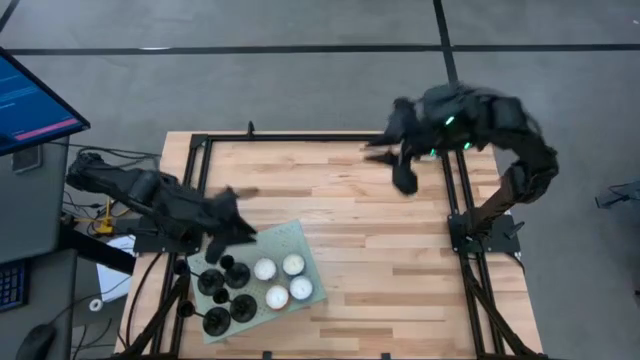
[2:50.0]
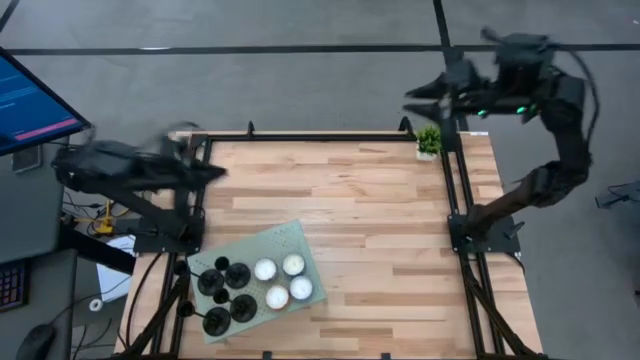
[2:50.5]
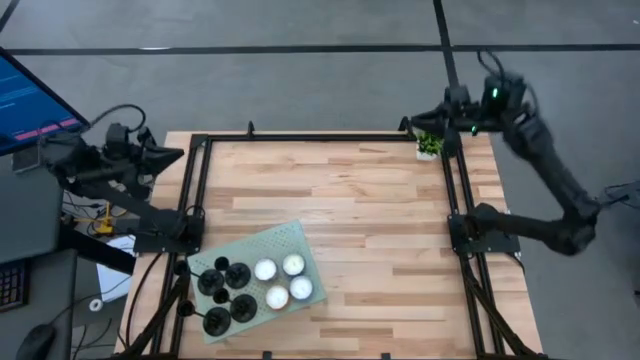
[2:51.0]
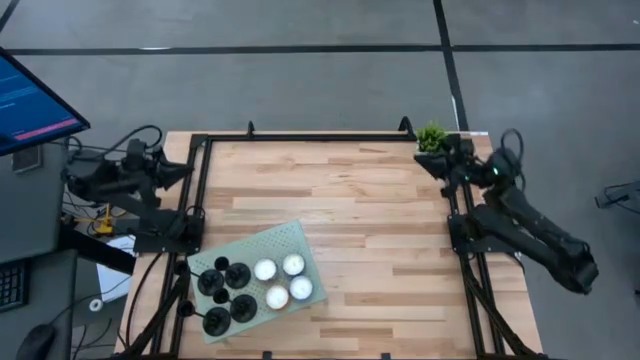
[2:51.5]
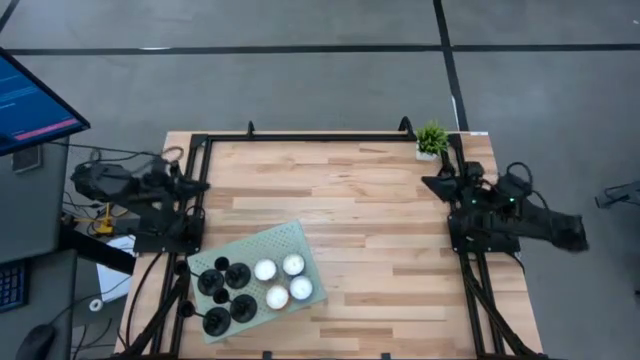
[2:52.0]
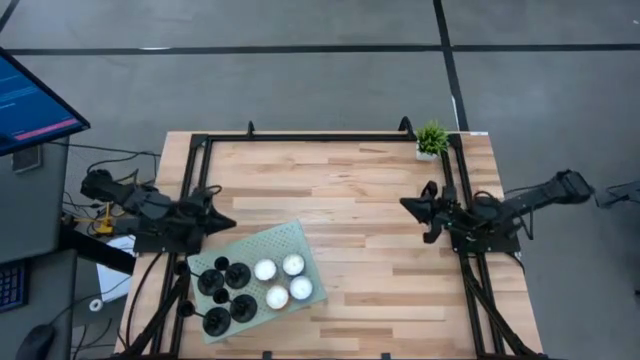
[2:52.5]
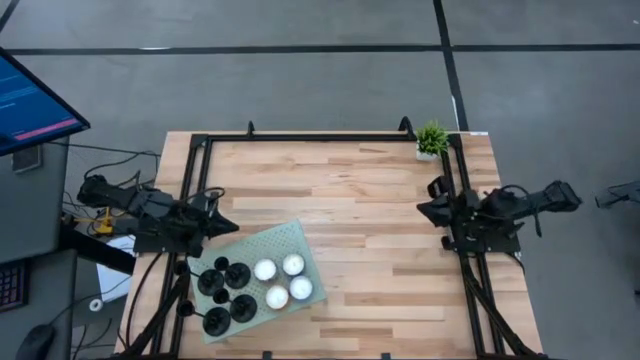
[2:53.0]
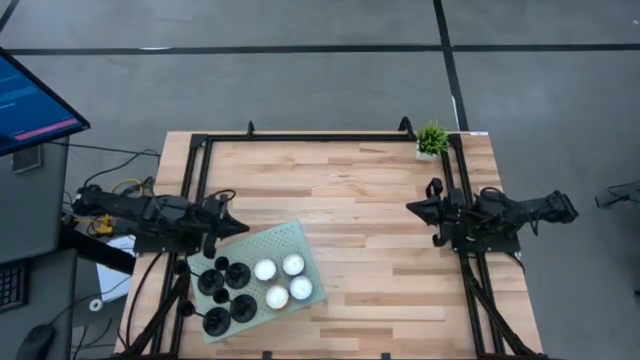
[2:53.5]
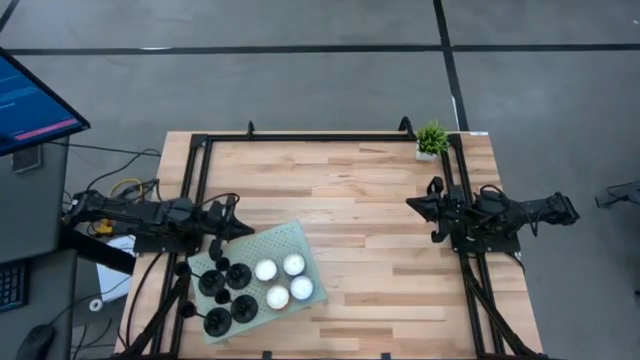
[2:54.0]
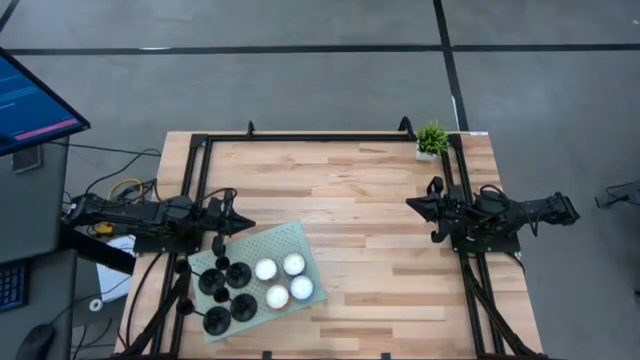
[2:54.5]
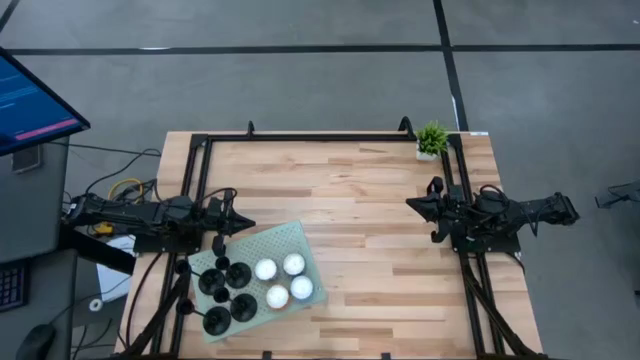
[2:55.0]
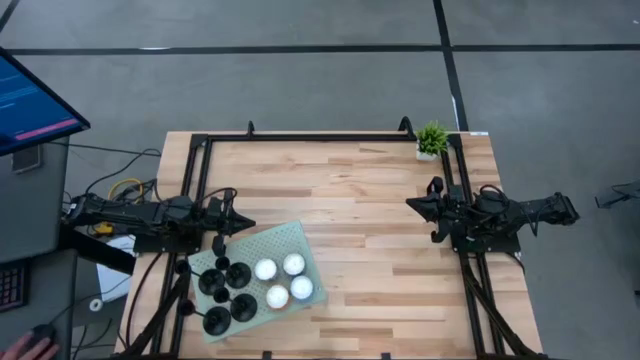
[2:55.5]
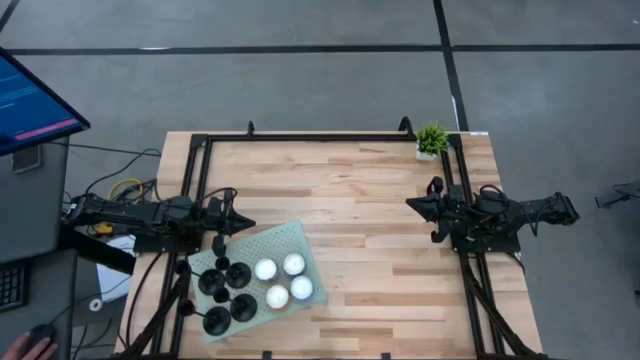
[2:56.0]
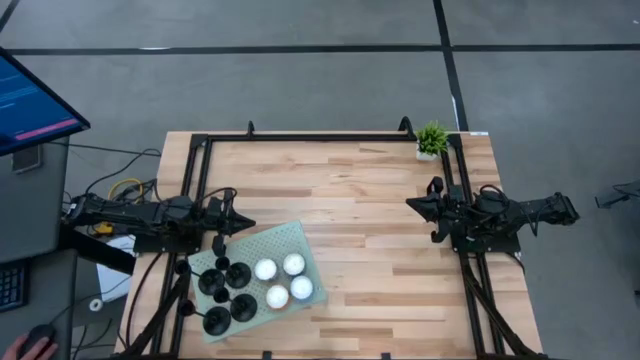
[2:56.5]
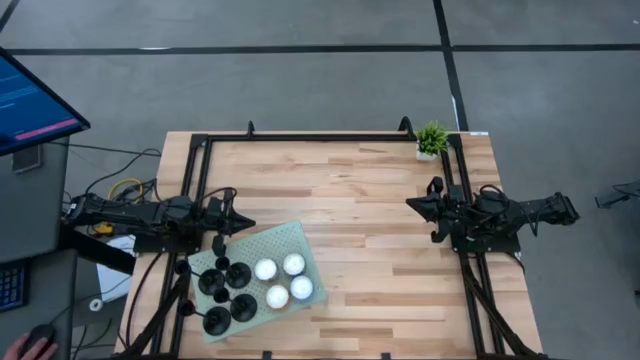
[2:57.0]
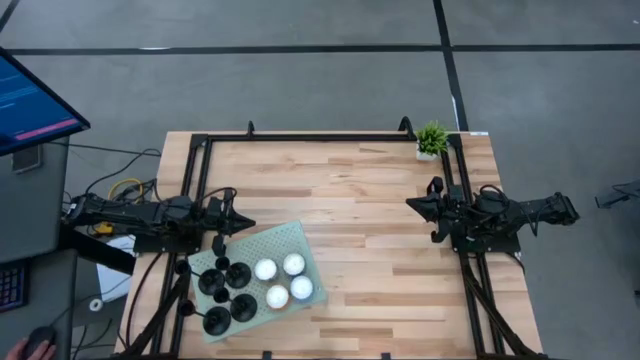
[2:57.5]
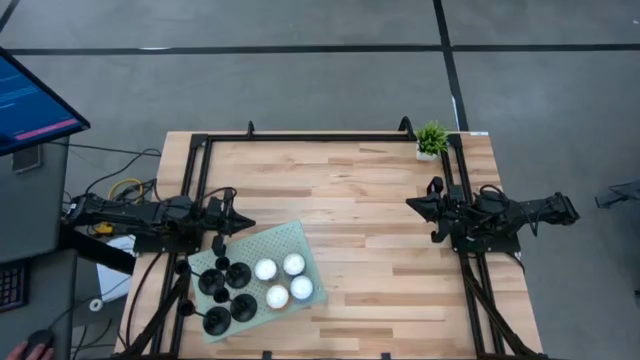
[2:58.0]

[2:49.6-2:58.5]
Task: Stock candles on shelf
Return to Home Position

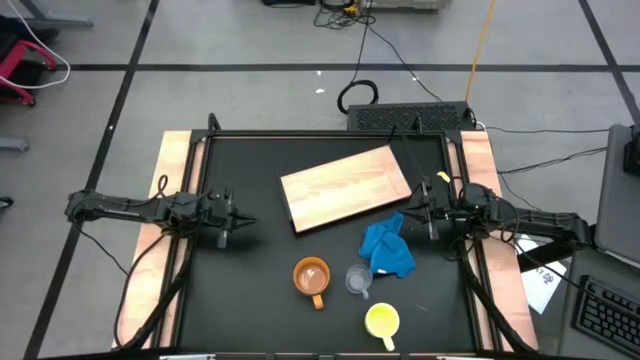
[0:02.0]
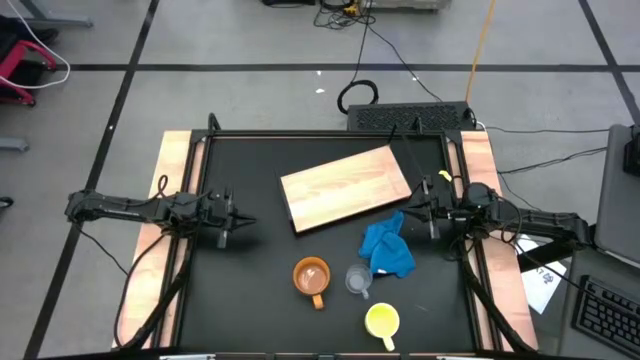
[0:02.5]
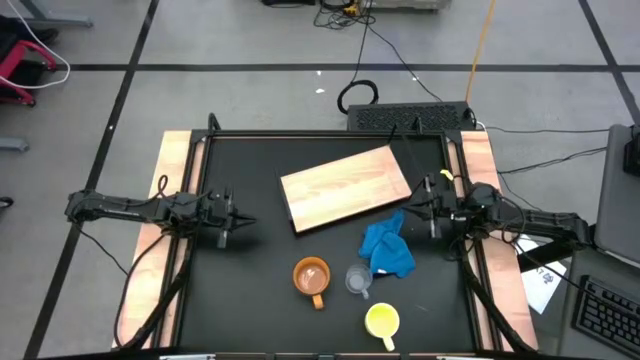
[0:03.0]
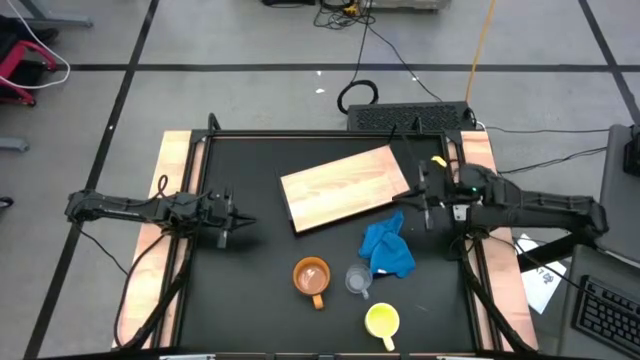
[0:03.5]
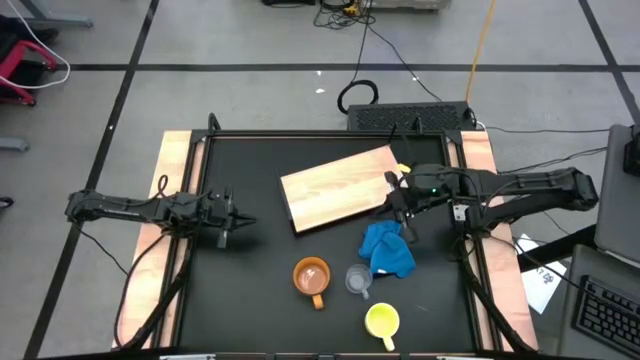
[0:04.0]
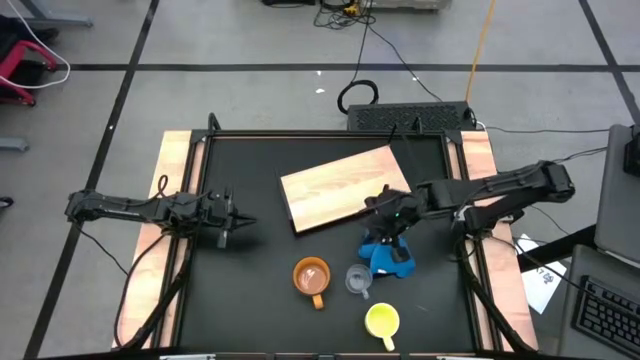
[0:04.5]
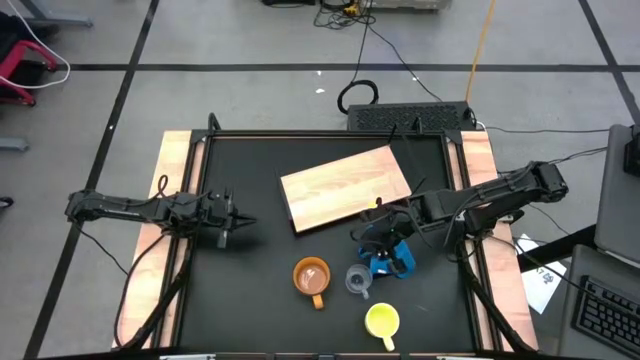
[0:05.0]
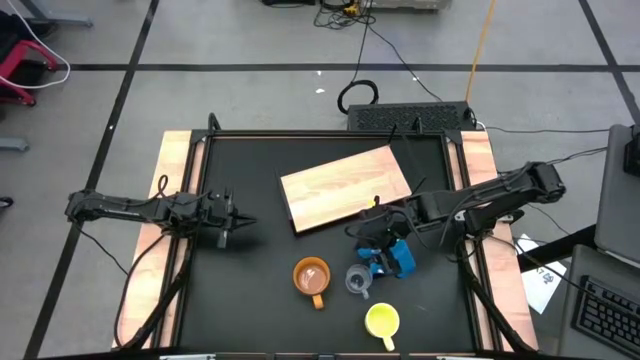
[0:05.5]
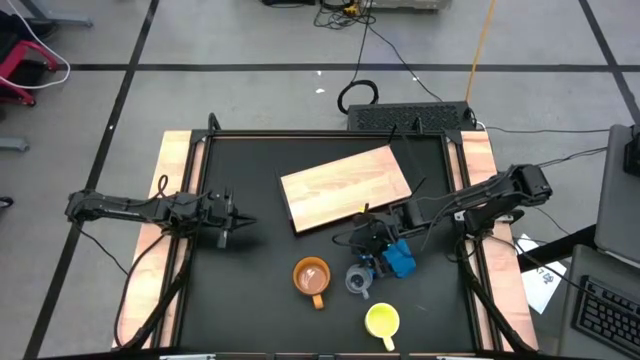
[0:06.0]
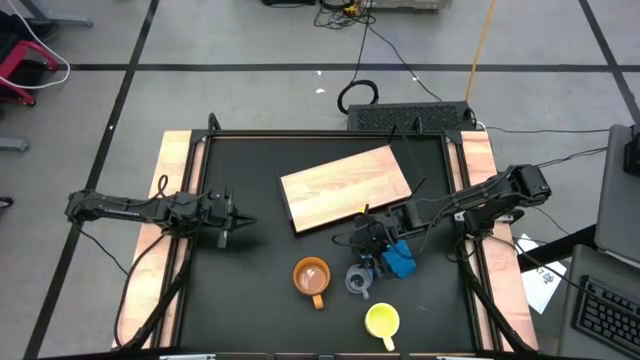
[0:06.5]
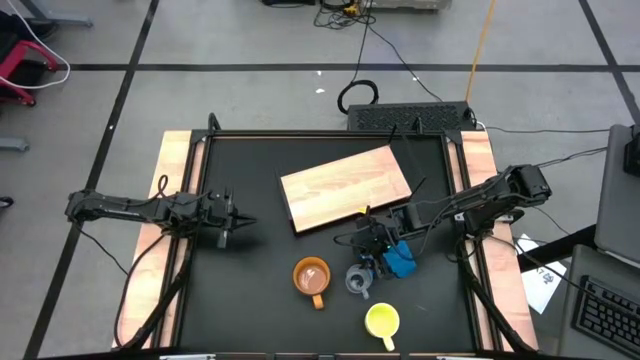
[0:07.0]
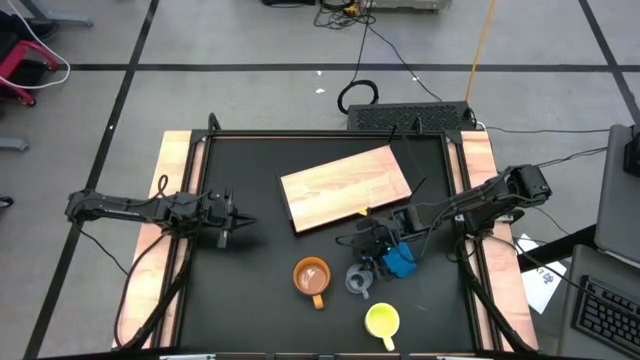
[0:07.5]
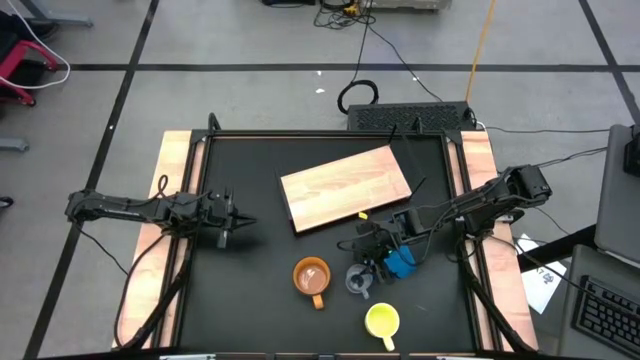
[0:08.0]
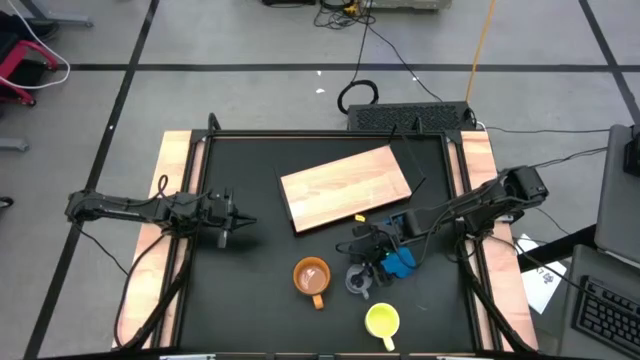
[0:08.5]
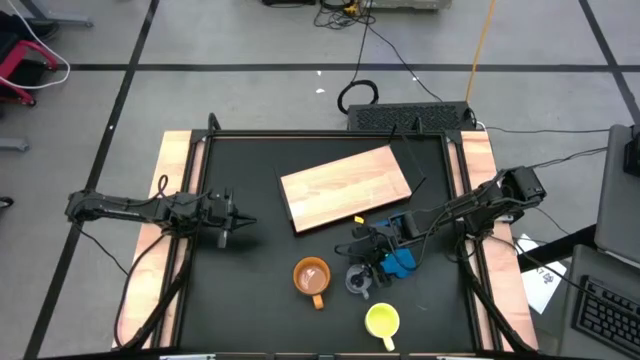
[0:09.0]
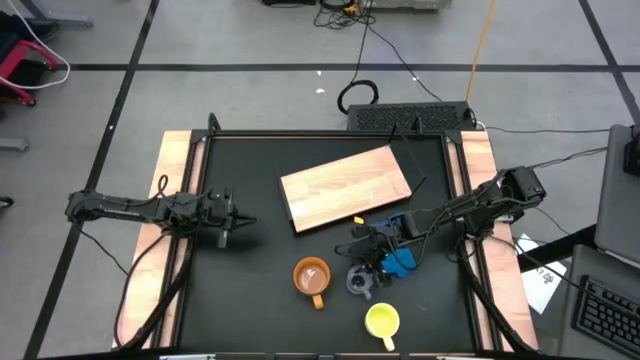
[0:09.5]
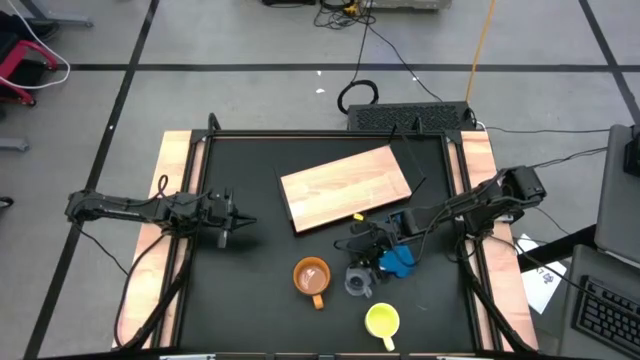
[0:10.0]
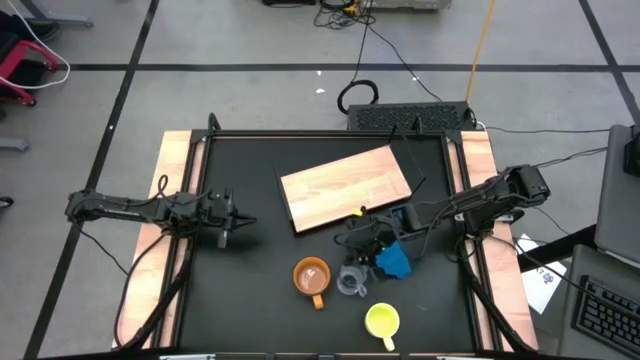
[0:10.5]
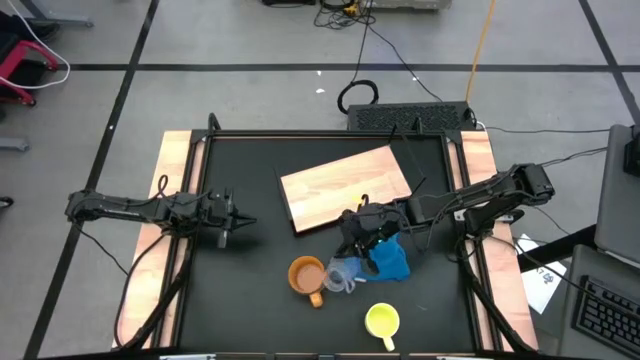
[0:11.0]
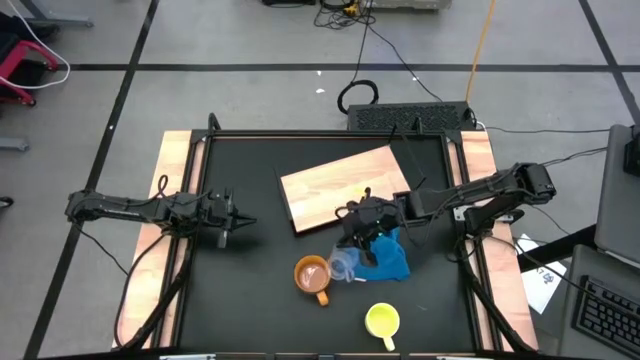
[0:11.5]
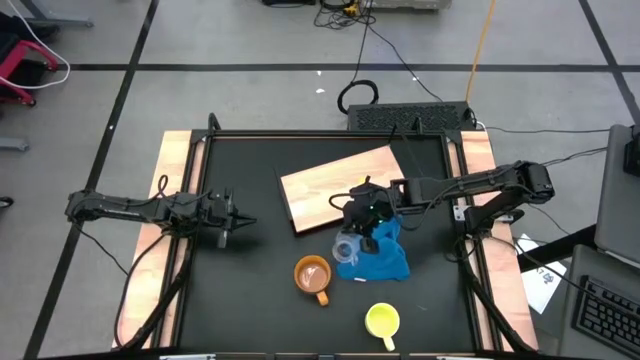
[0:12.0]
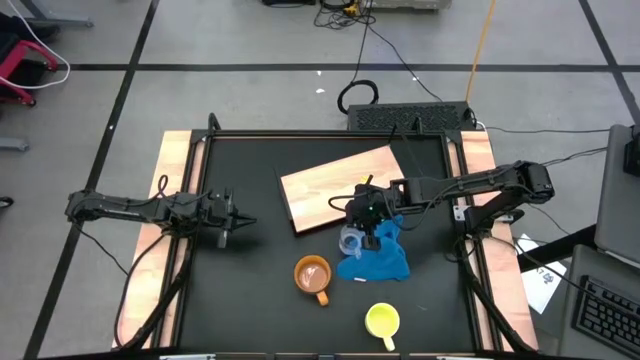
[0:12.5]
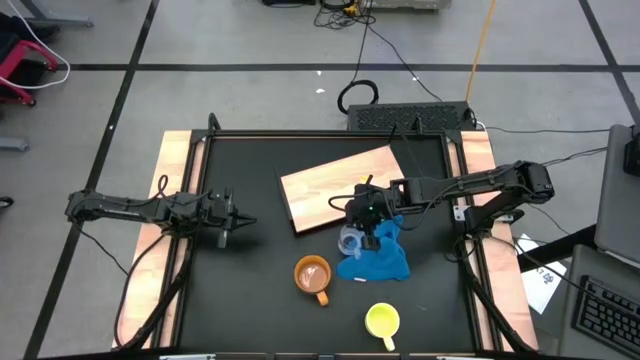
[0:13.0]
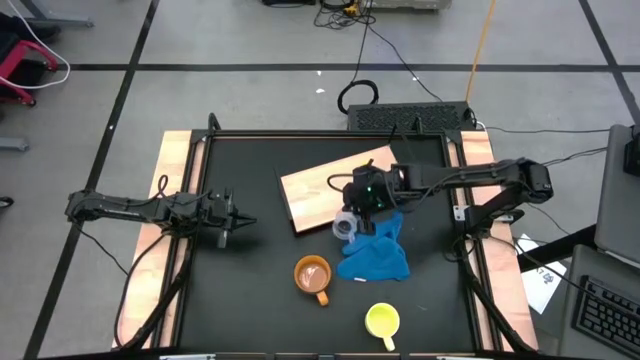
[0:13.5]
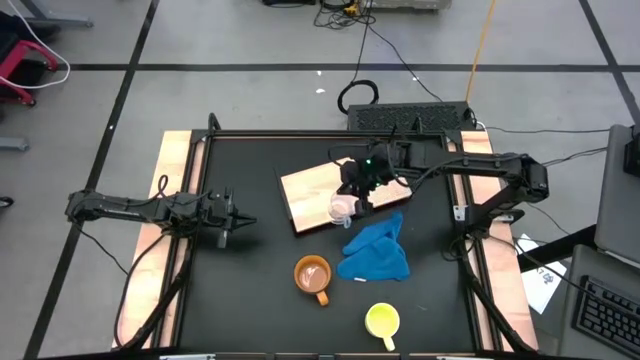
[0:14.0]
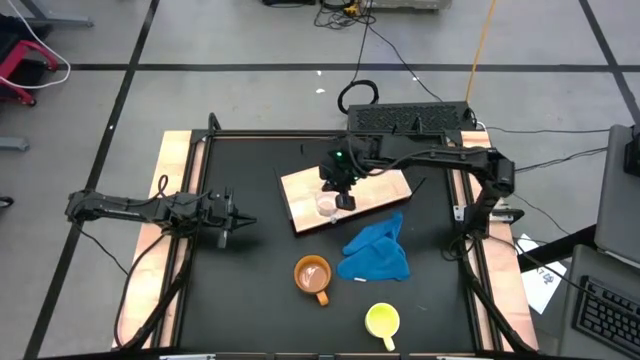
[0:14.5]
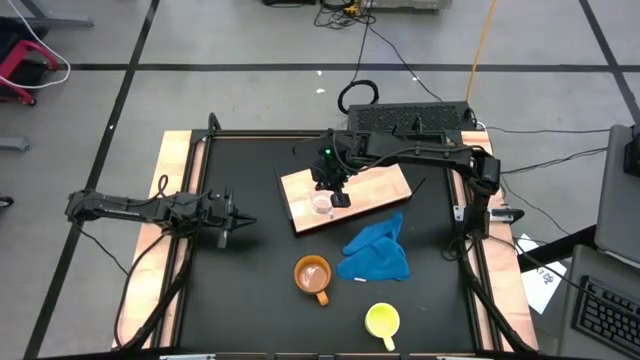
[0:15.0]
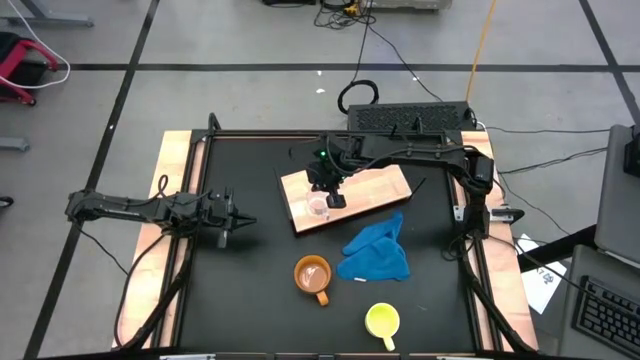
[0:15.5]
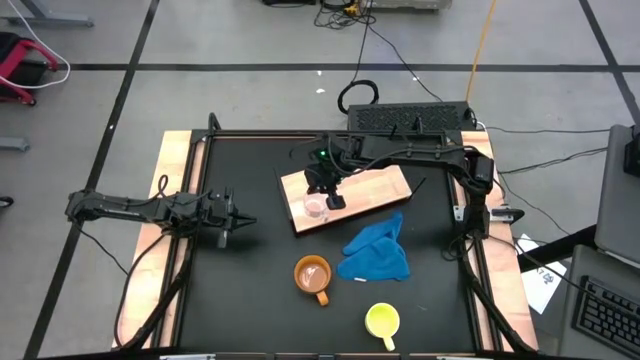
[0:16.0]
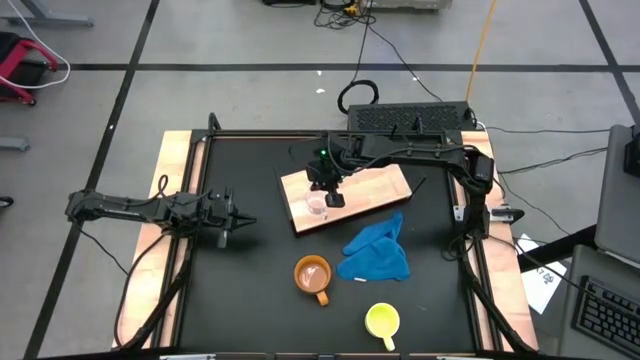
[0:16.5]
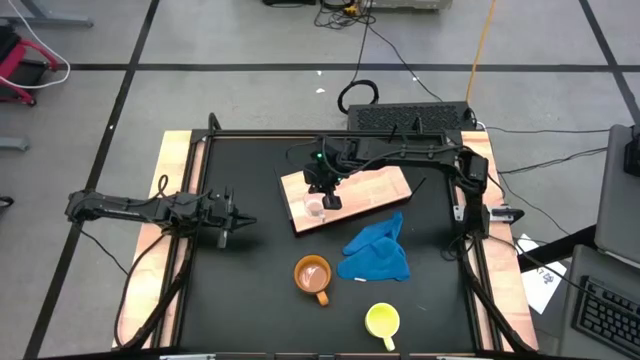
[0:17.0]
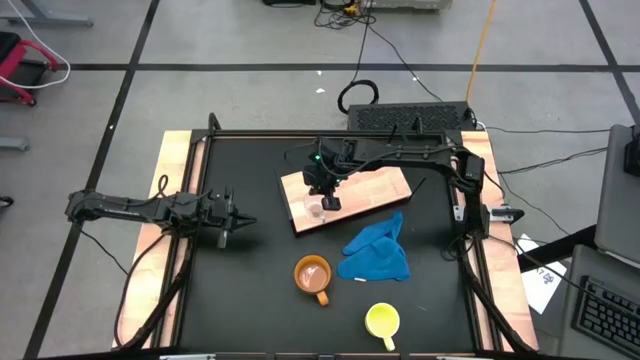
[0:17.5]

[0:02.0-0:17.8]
Task: Stack small to large cups/mugs on shelf
Put the transparent mug on the shelf
